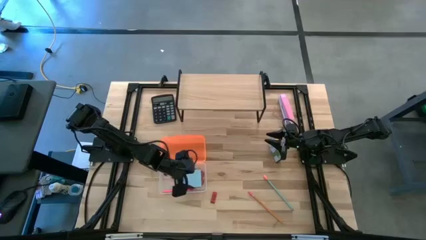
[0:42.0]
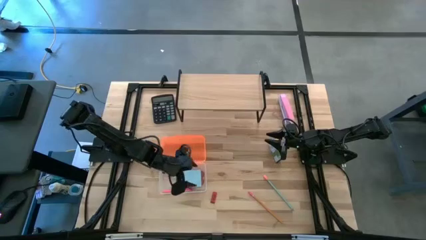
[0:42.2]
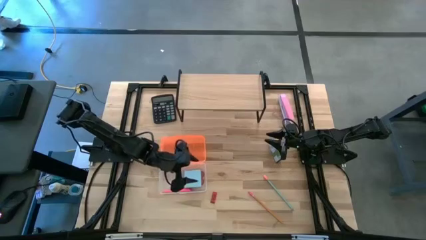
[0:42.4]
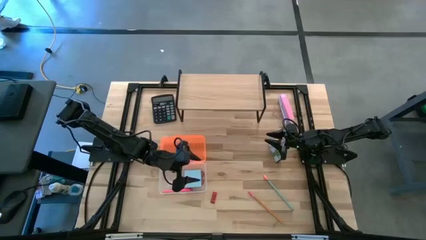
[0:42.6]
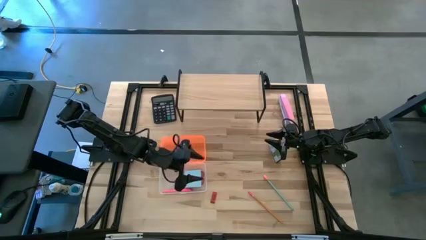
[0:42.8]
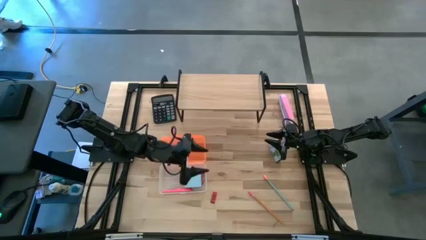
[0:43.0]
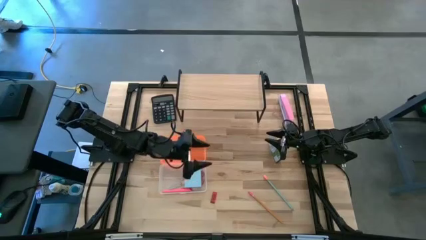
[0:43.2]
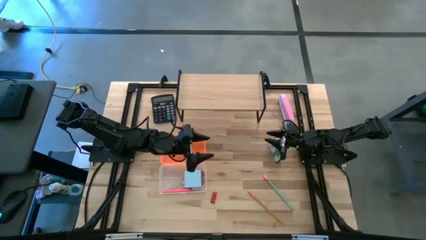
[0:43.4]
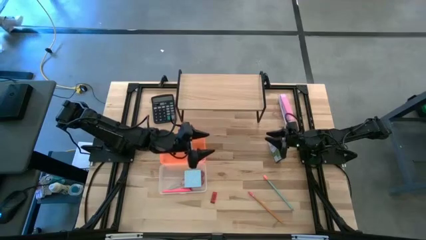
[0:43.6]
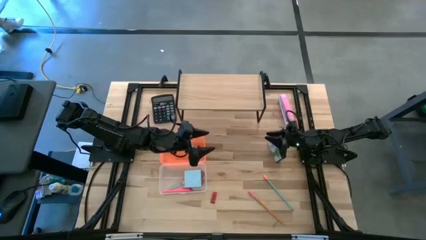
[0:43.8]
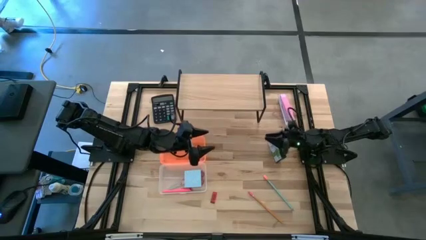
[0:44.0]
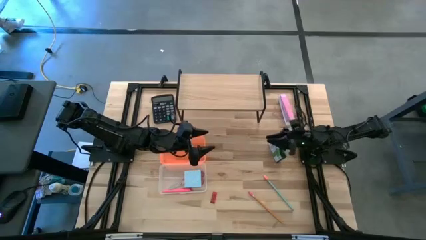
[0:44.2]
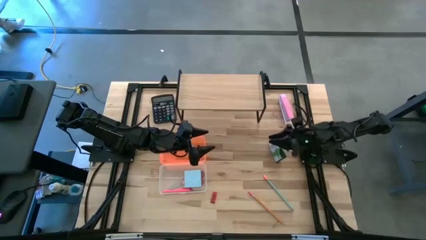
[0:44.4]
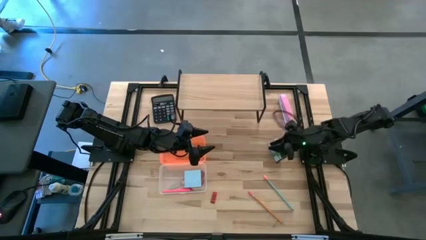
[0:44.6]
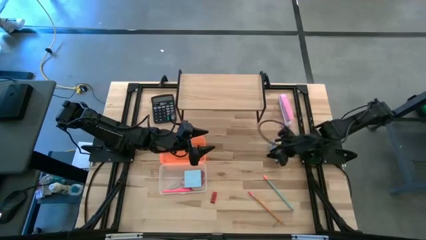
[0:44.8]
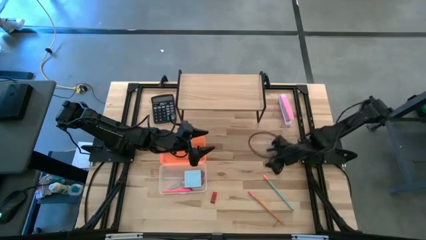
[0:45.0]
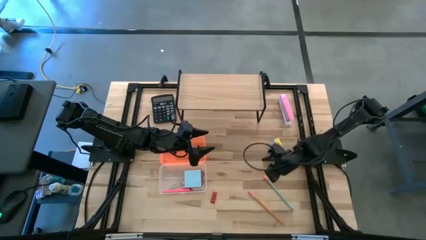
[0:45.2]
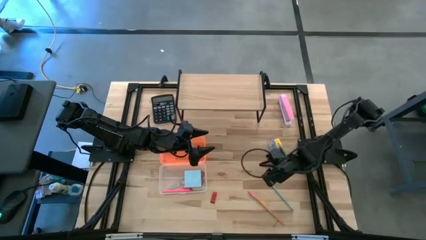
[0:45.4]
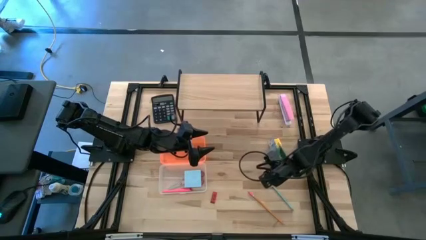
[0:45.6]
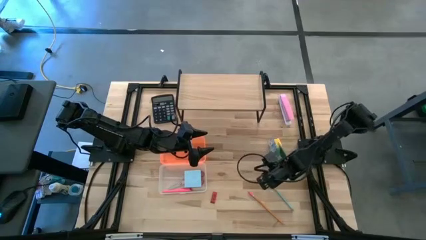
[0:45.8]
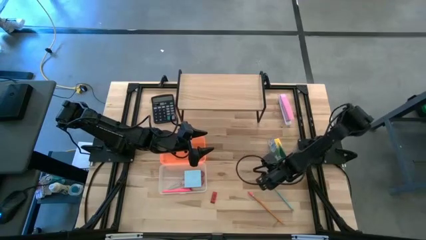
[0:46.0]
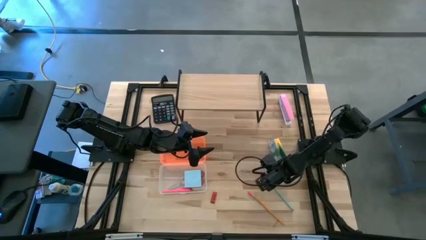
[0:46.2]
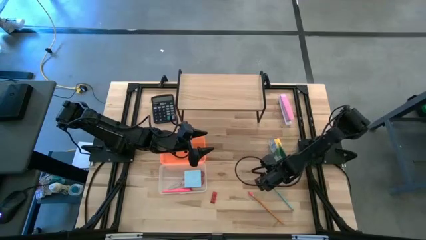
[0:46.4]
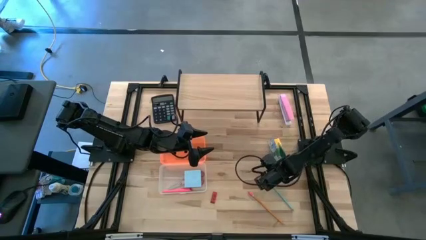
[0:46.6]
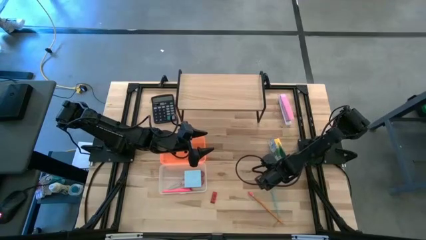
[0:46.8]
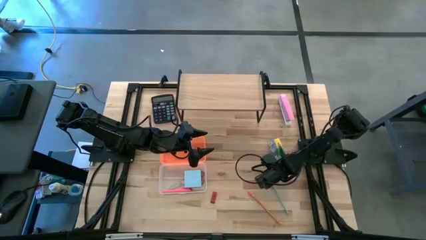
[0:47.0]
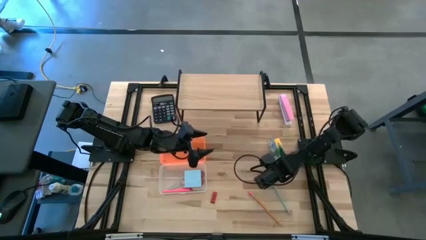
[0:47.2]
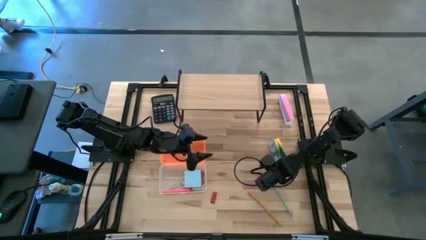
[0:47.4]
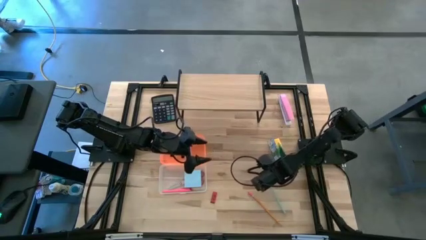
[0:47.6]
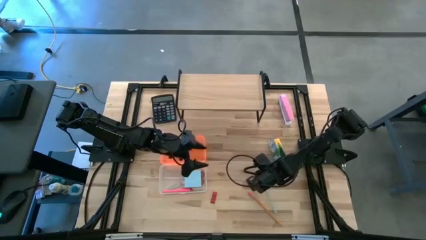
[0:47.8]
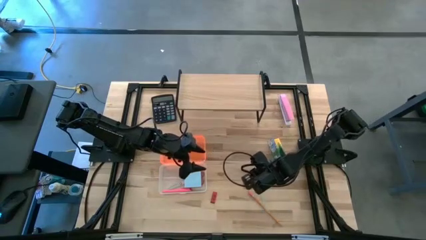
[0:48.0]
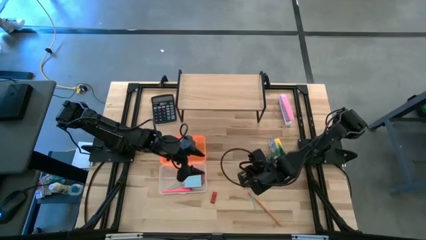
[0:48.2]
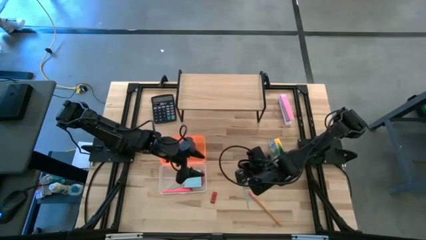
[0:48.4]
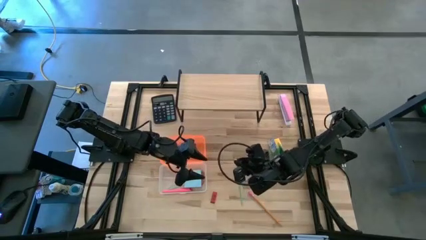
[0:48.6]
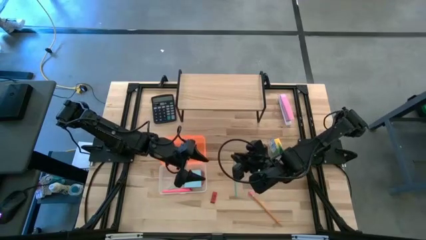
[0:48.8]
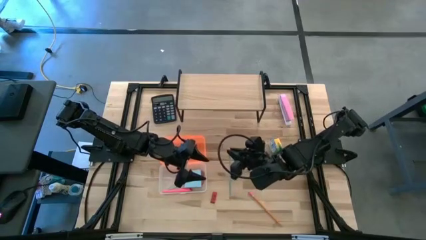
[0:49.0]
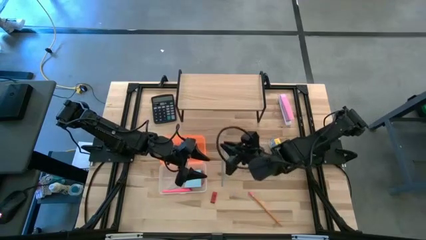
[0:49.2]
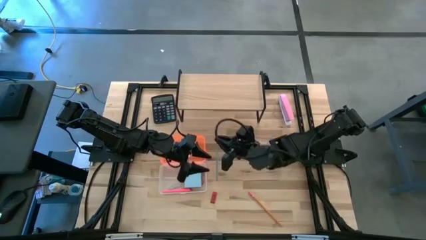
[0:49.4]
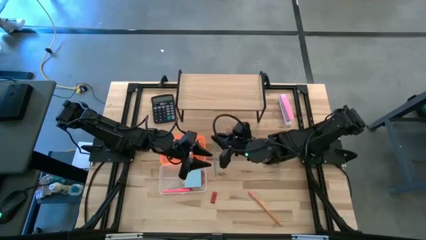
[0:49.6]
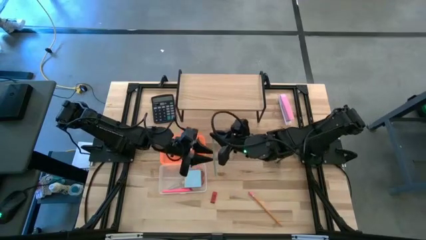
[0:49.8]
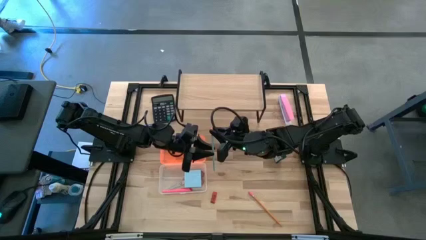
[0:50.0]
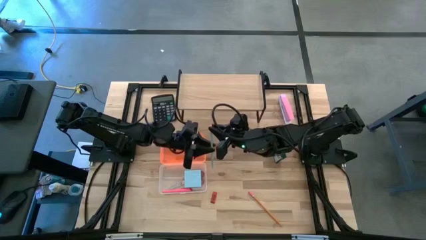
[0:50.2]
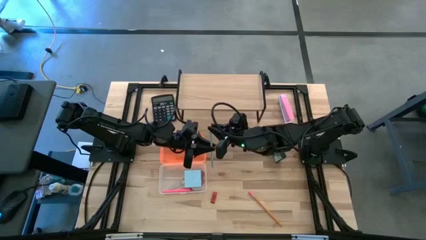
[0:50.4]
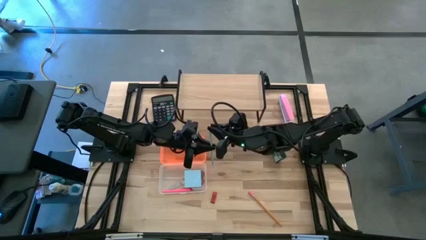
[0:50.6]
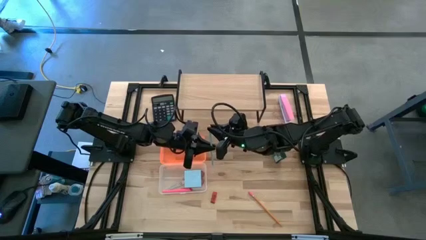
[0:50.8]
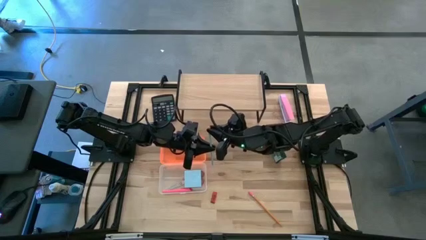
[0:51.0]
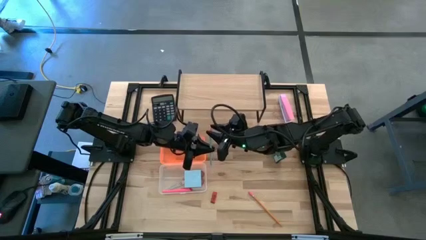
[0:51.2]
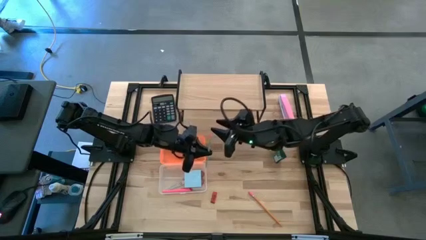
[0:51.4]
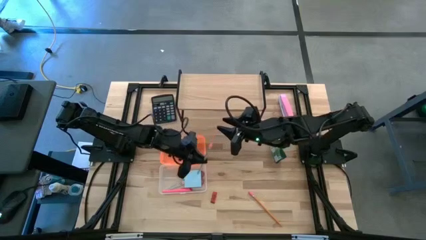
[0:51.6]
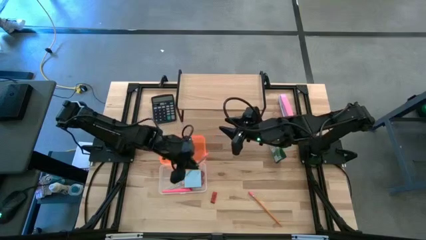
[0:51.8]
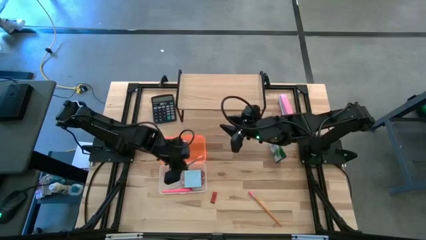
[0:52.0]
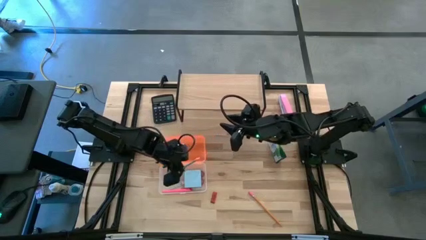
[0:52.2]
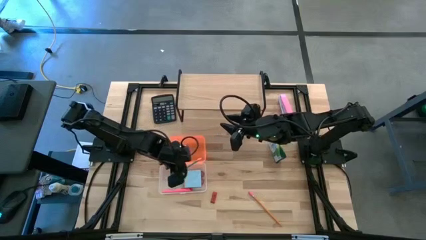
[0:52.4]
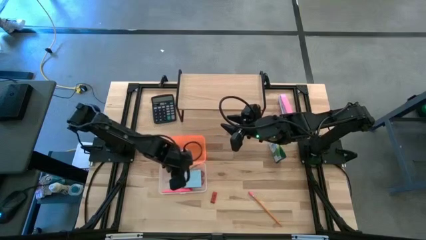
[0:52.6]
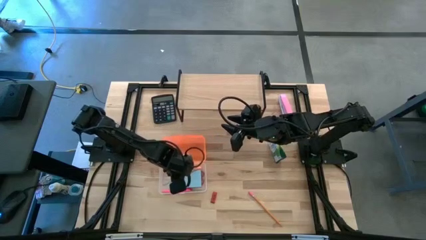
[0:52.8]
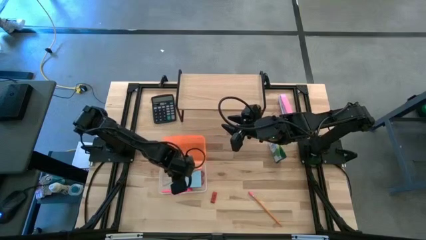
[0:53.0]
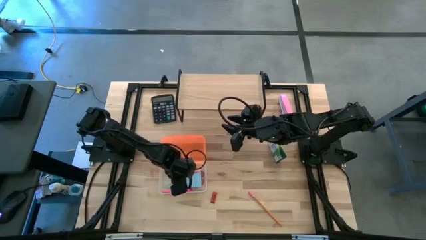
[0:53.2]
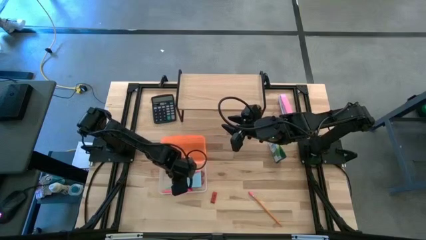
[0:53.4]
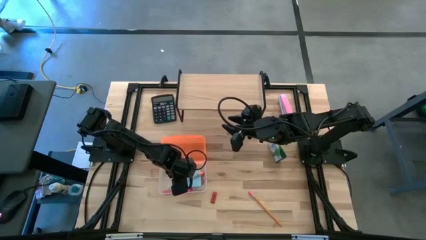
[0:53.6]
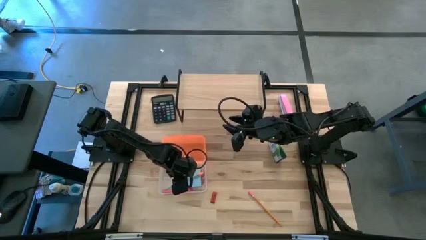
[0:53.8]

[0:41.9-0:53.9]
Task: Pack school essentials
Put the blue pencil into the supply box

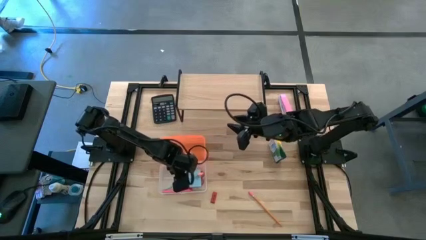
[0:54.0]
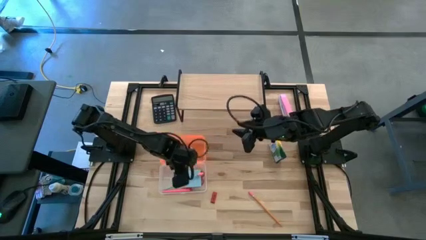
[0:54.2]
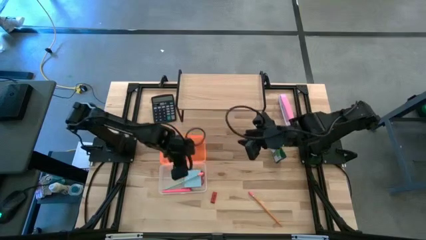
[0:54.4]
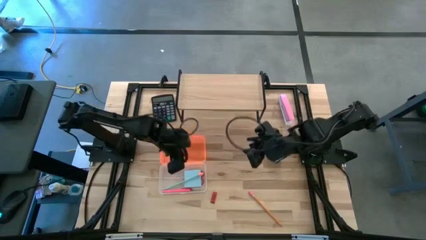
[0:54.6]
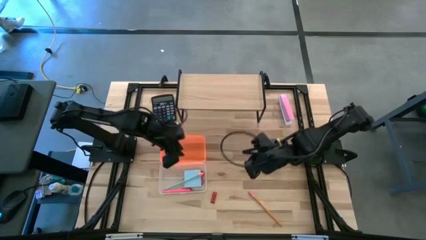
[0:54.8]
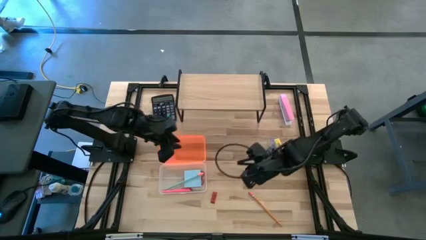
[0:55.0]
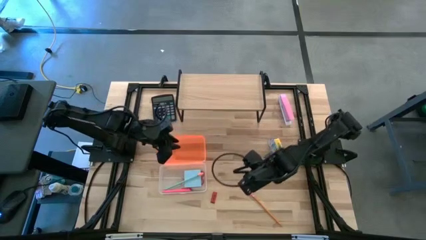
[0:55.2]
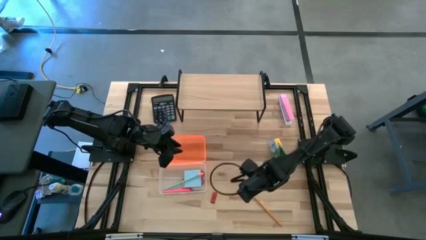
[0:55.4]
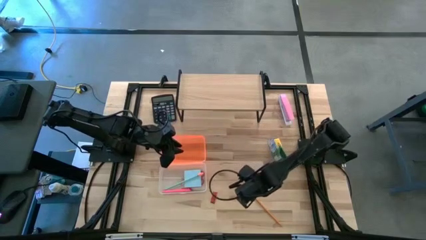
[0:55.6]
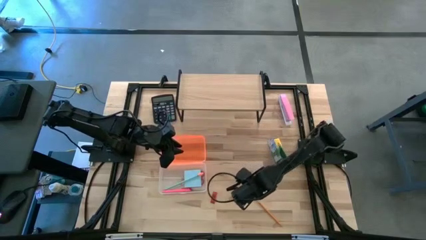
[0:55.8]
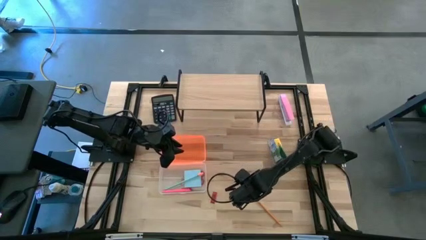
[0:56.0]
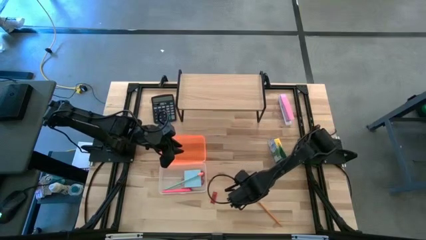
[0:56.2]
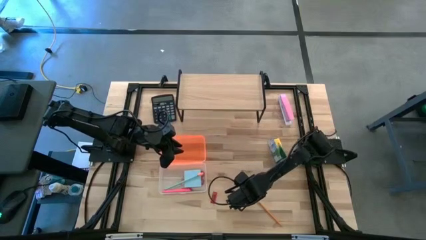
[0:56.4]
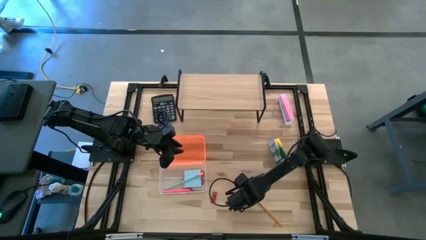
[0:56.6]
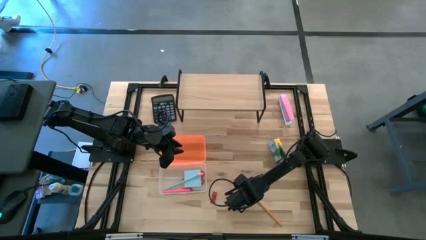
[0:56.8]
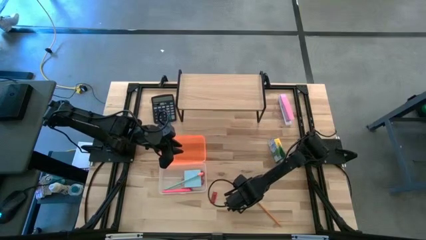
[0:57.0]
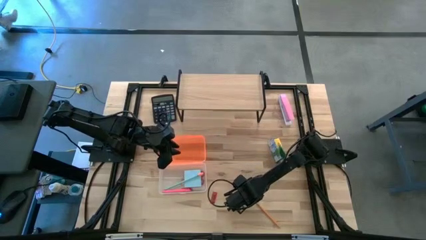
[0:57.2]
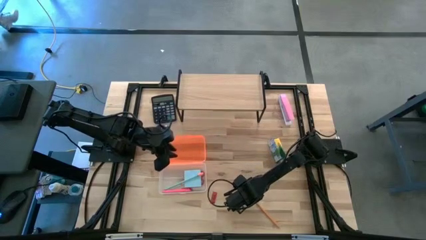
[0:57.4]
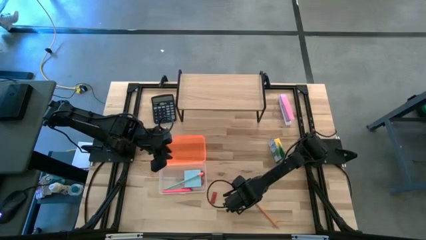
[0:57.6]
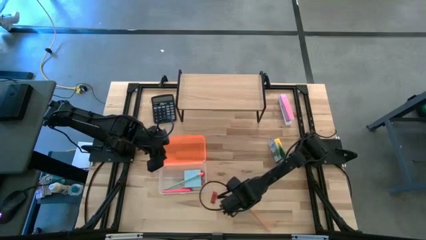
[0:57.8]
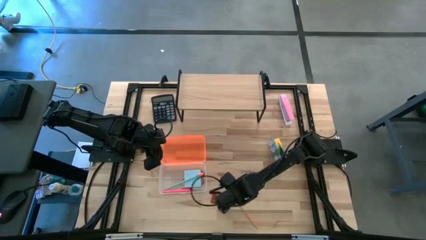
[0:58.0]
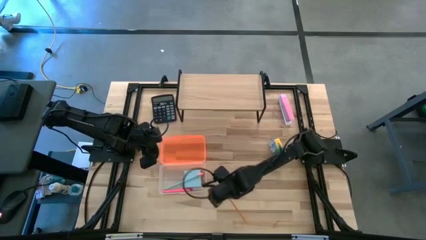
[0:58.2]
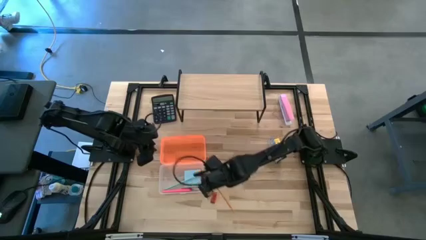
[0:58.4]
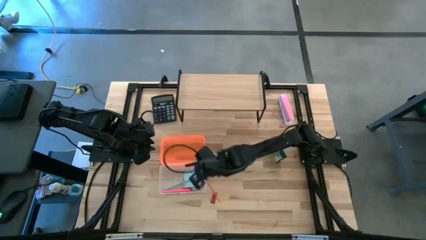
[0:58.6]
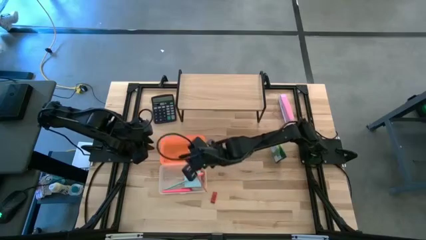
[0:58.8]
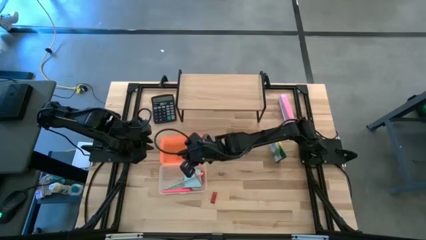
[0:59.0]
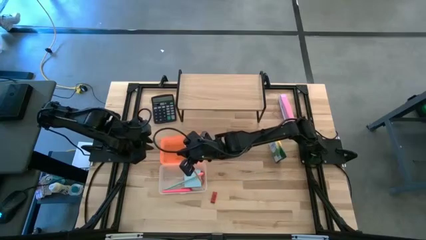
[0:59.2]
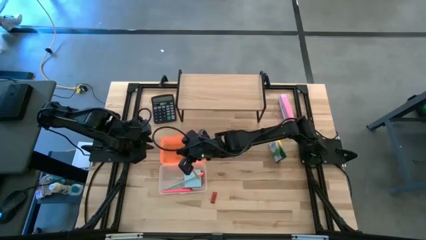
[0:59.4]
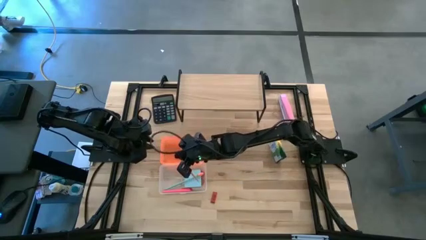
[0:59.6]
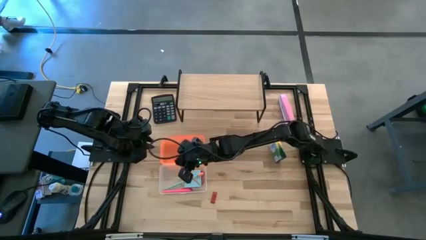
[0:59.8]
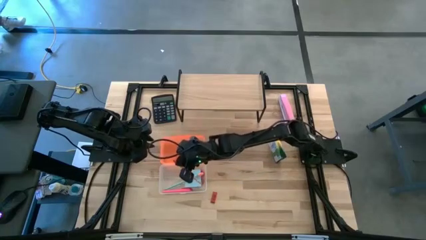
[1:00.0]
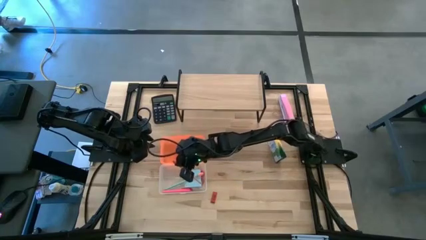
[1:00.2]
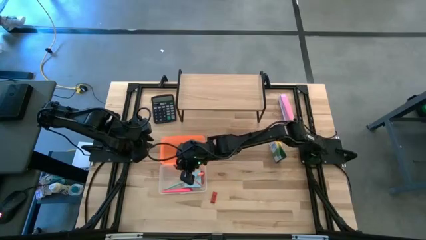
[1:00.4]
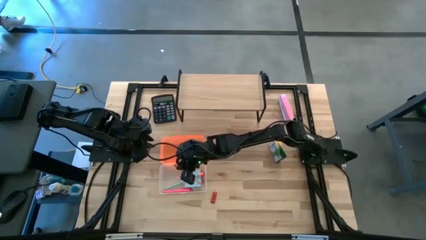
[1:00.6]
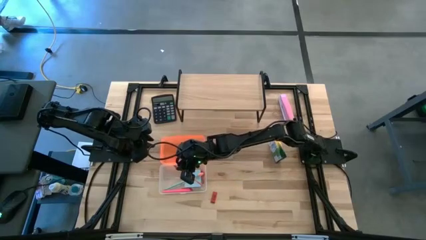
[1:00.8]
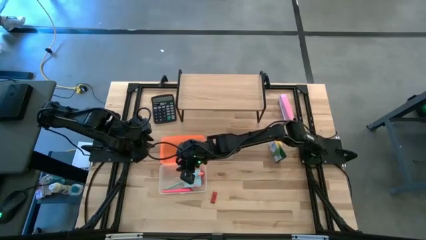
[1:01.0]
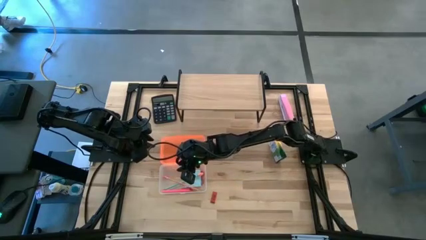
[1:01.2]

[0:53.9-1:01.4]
Put the orange pencil into the supply box
